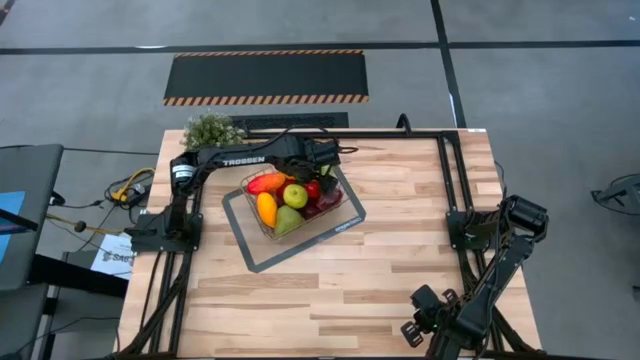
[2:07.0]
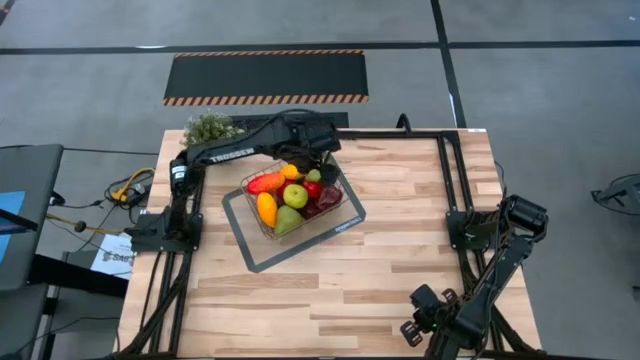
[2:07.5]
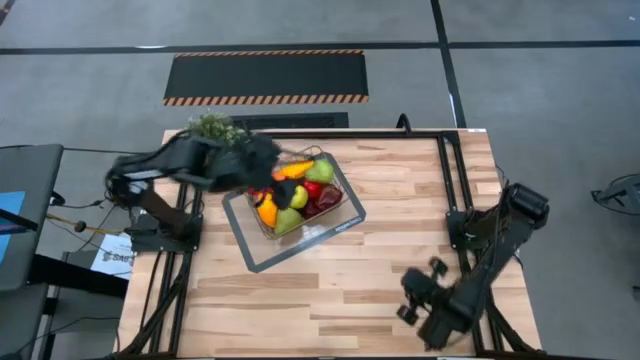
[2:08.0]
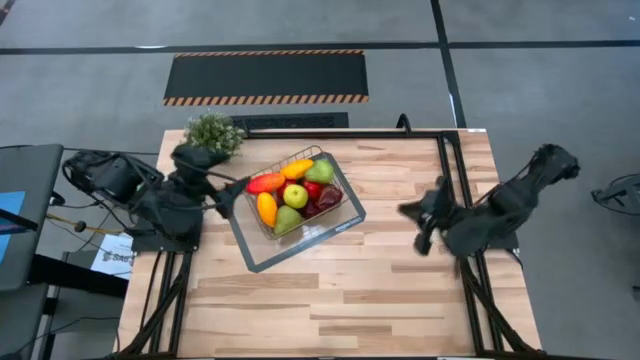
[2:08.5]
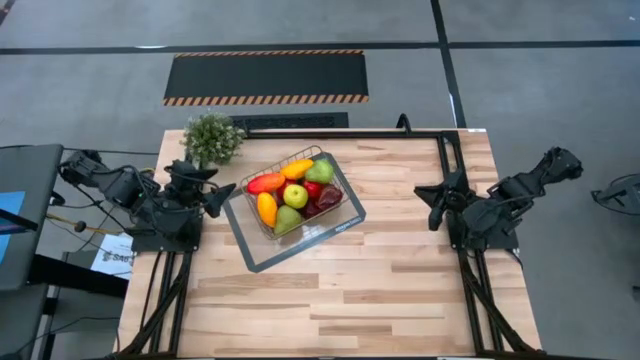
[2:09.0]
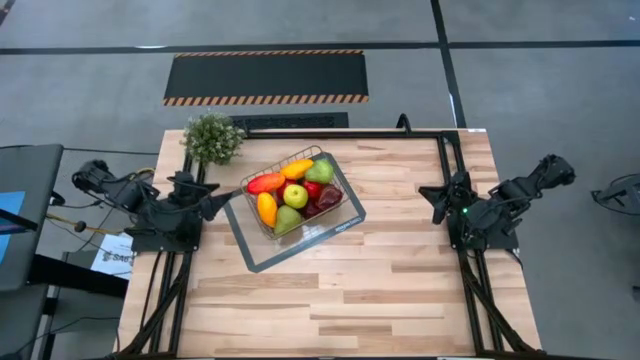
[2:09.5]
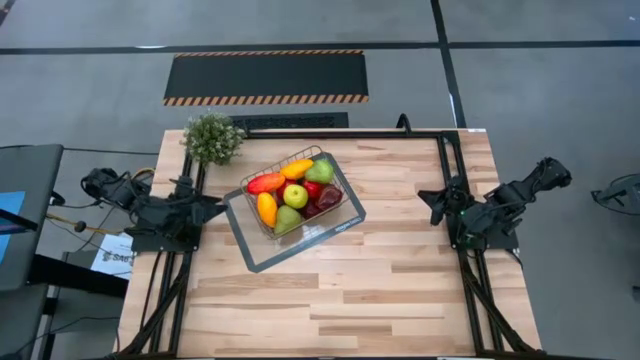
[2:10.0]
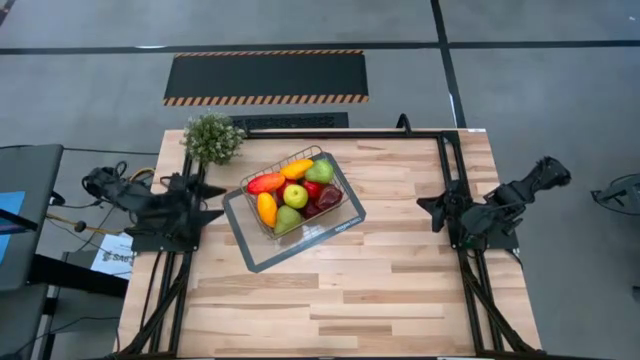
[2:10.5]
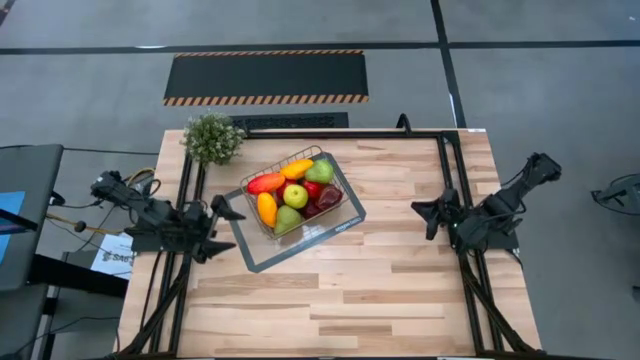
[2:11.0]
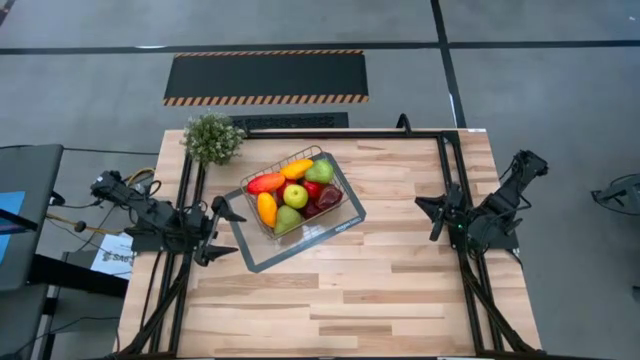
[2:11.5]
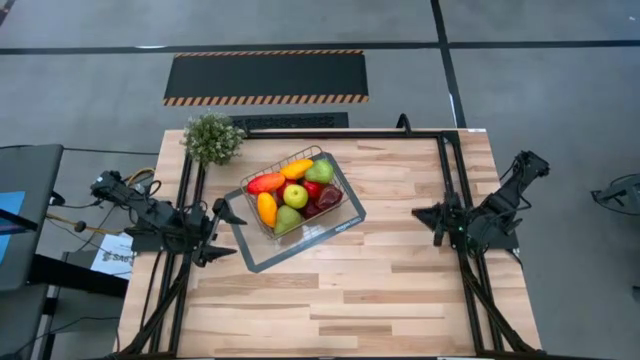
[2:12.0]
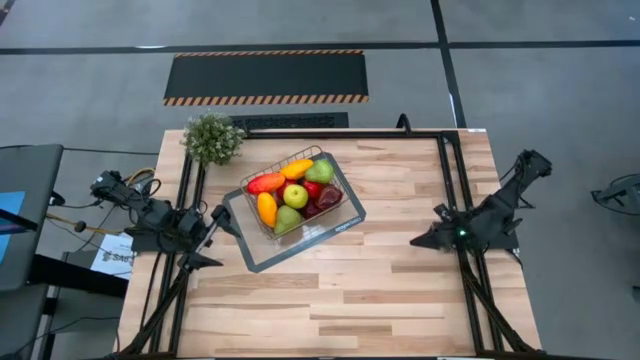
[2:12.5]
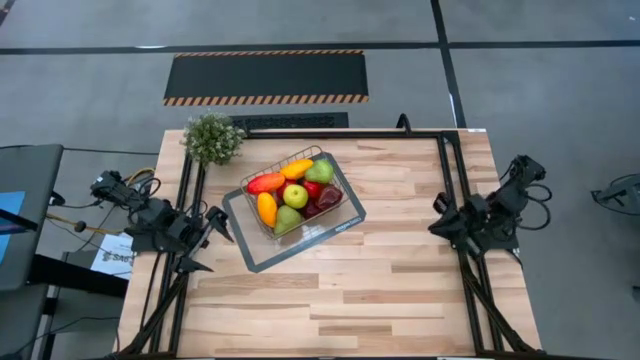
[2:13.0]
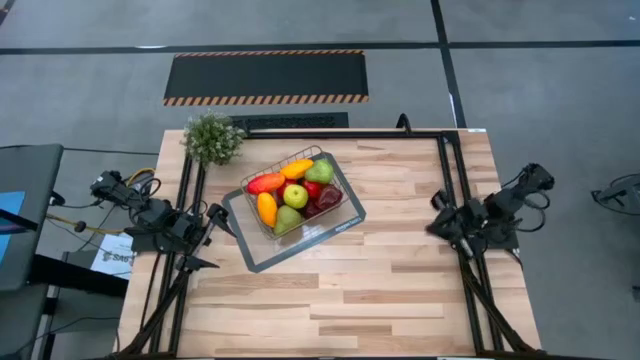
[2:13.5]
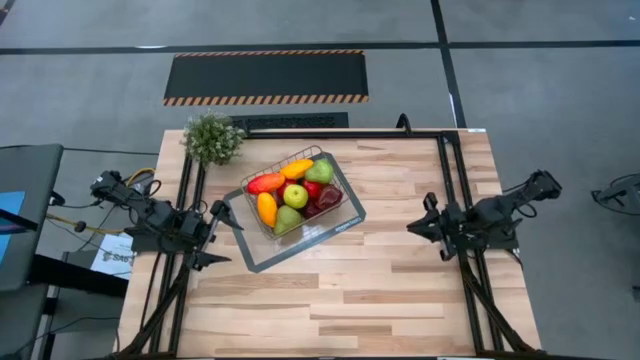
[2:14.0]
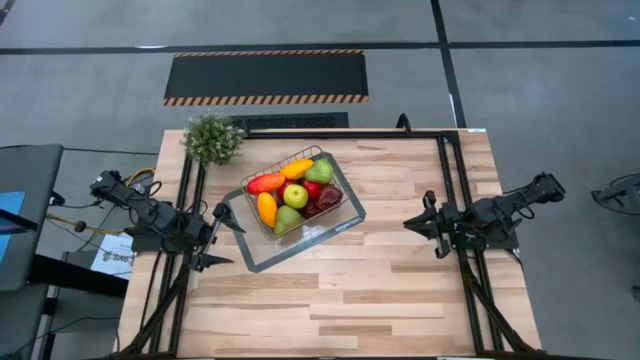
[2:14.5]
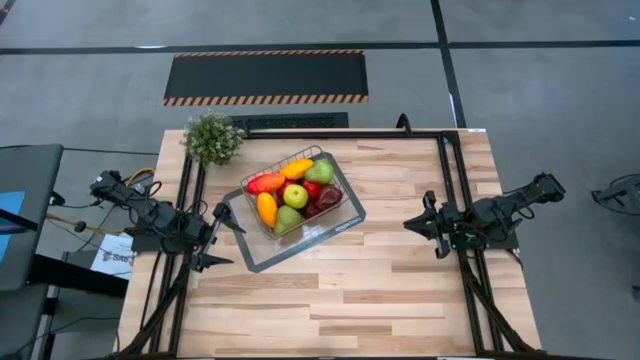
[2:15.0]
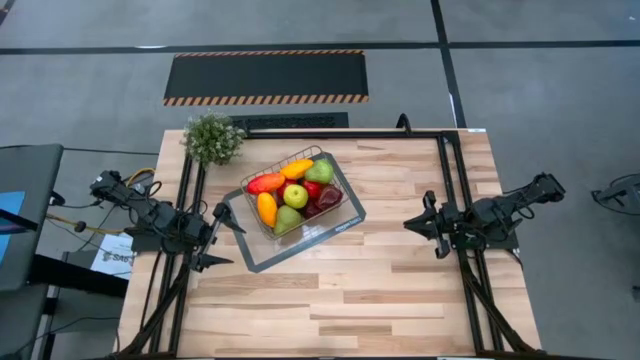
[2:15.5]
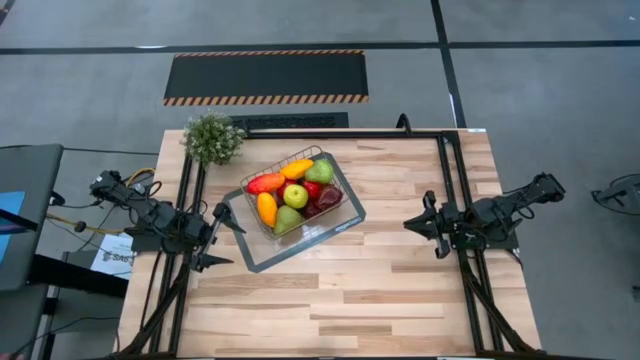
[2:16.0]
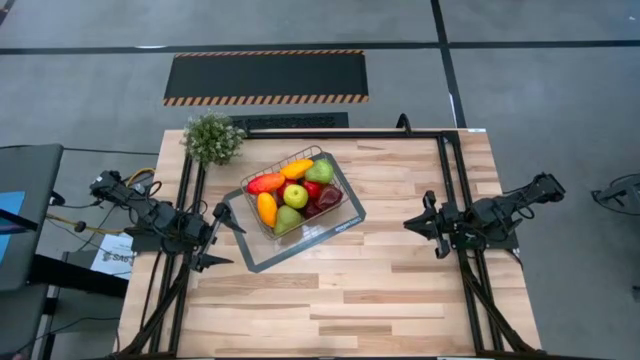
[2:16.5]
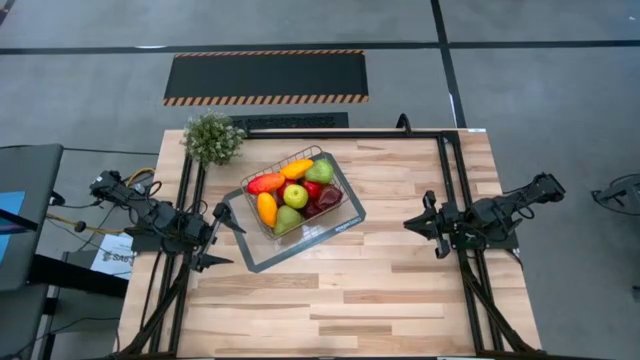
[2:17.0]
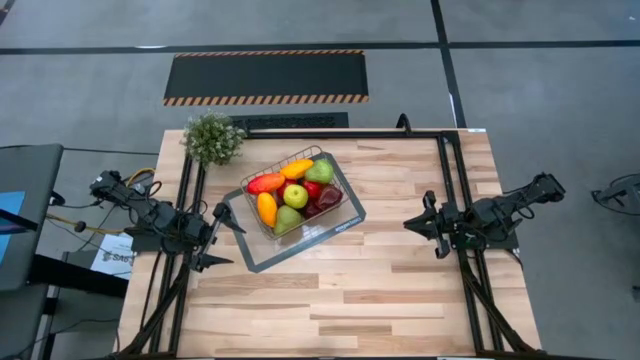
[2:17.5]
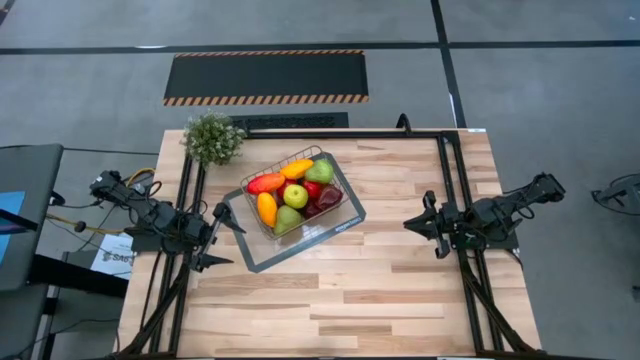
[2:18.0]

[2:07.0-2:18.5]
Task: Build produce basket
Return to Home Position

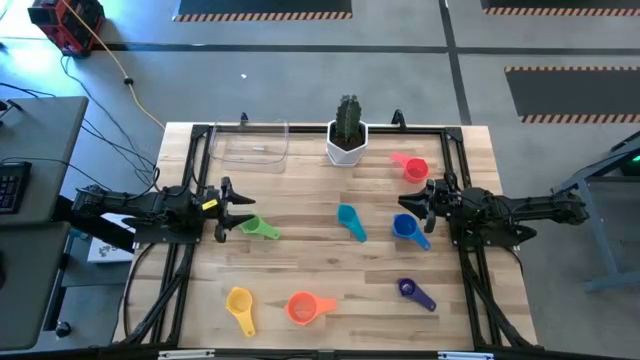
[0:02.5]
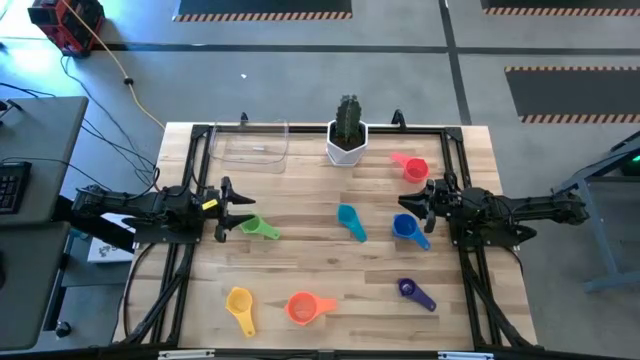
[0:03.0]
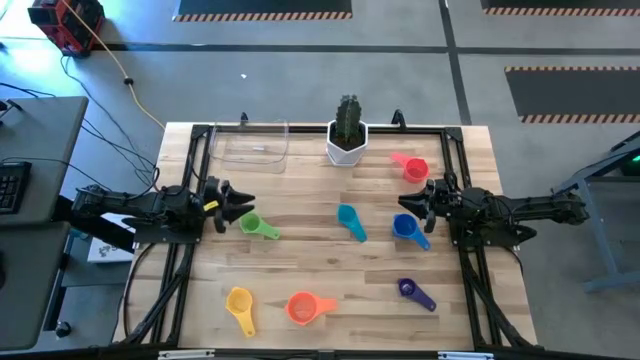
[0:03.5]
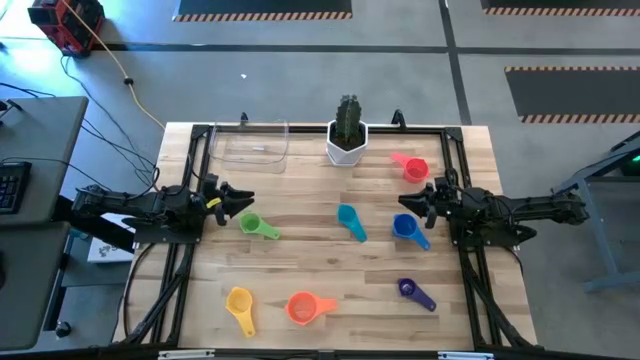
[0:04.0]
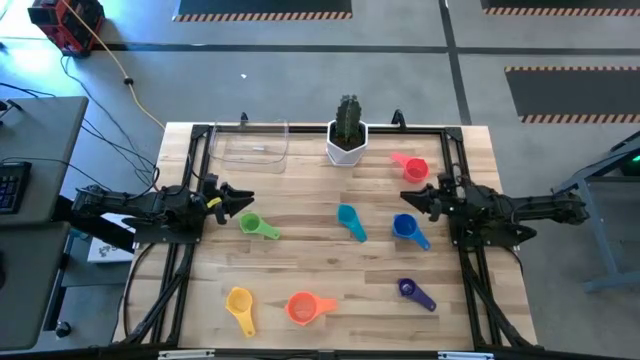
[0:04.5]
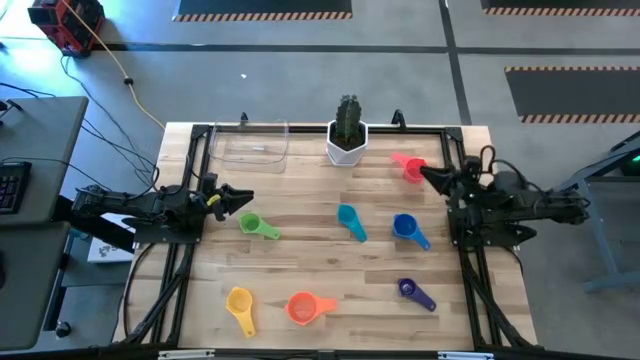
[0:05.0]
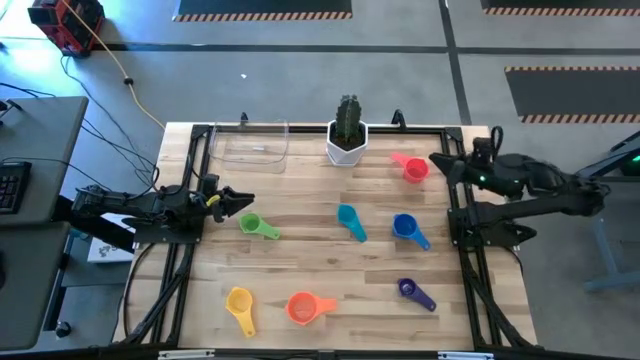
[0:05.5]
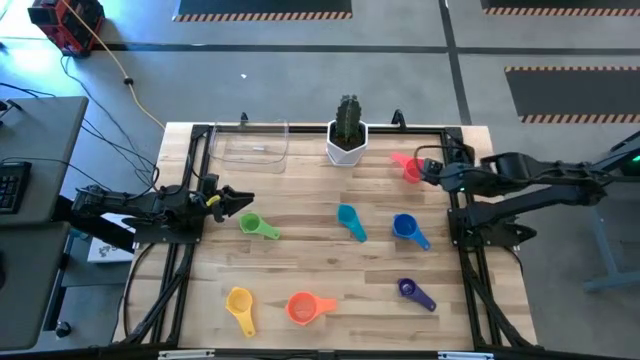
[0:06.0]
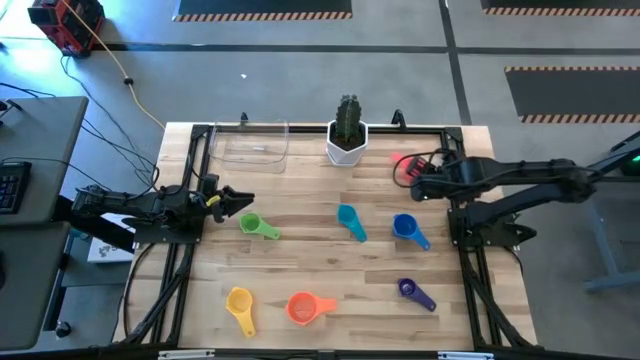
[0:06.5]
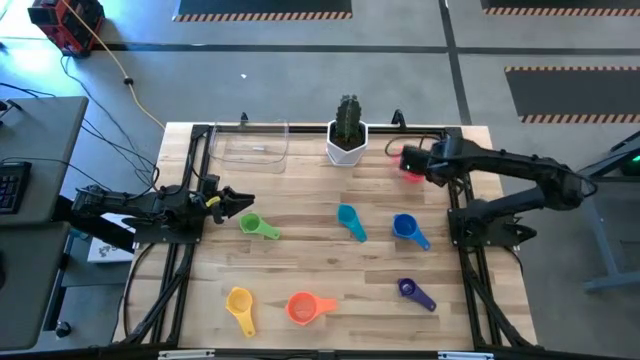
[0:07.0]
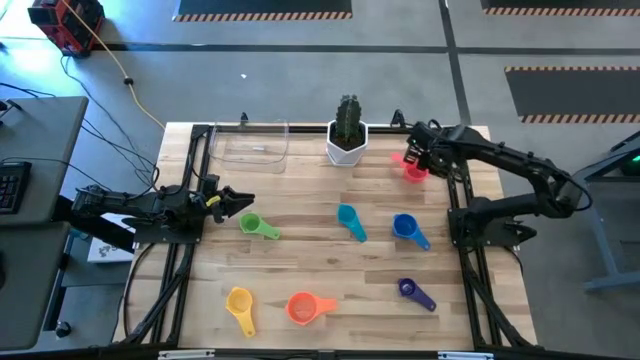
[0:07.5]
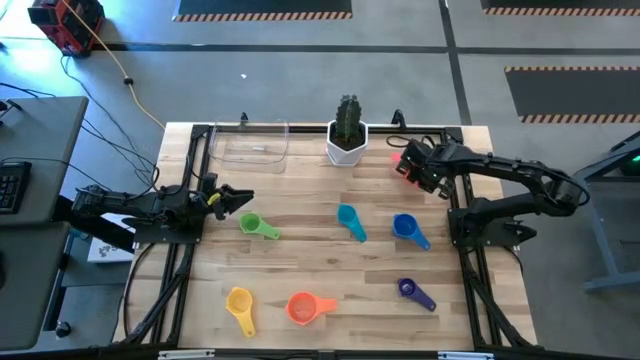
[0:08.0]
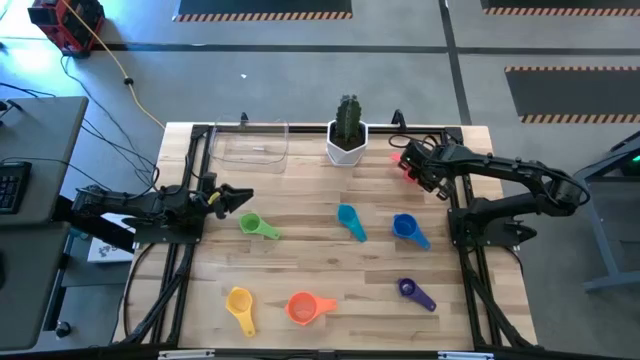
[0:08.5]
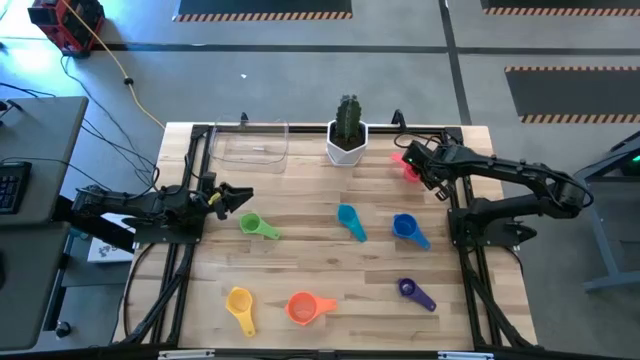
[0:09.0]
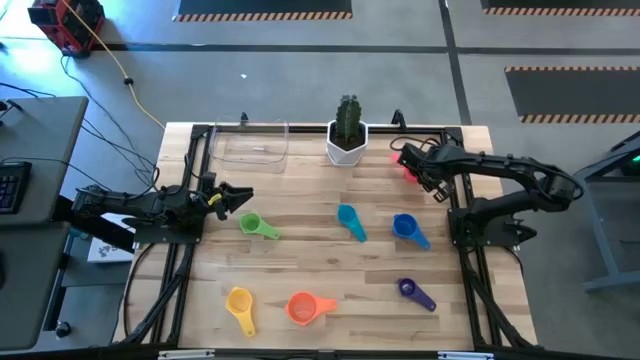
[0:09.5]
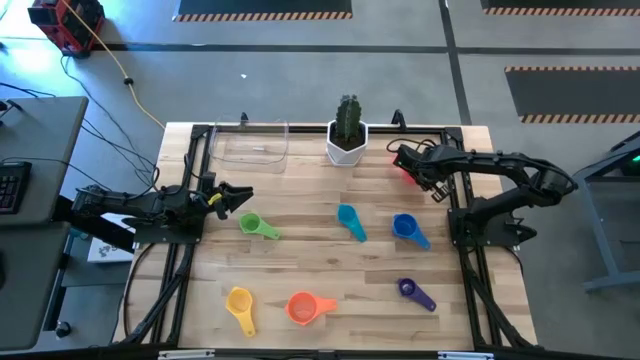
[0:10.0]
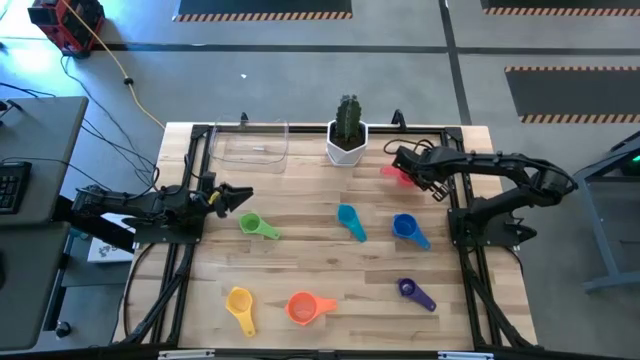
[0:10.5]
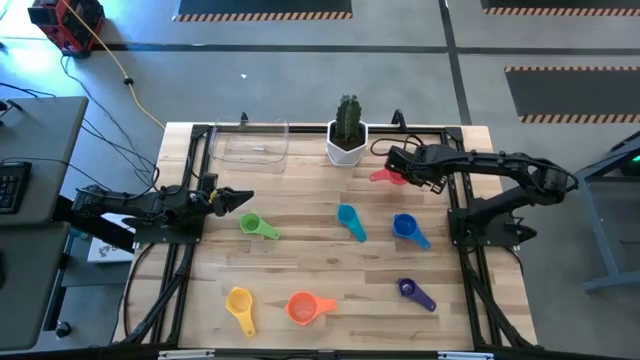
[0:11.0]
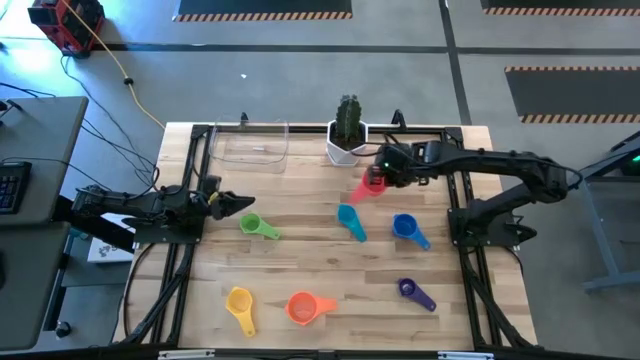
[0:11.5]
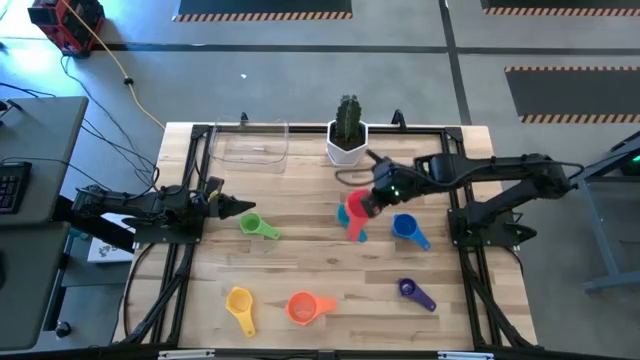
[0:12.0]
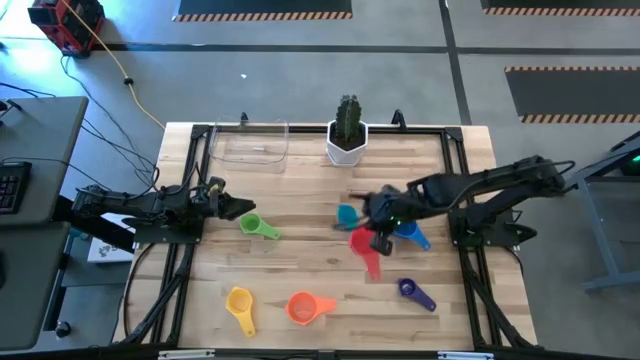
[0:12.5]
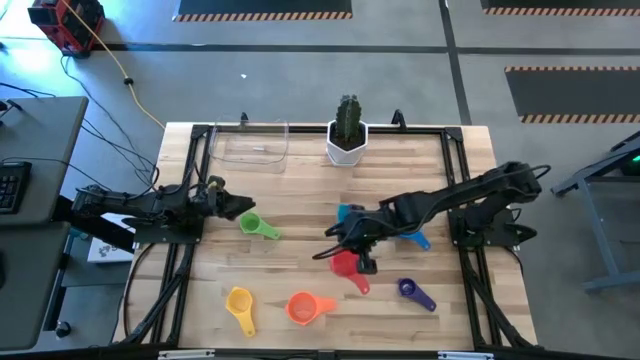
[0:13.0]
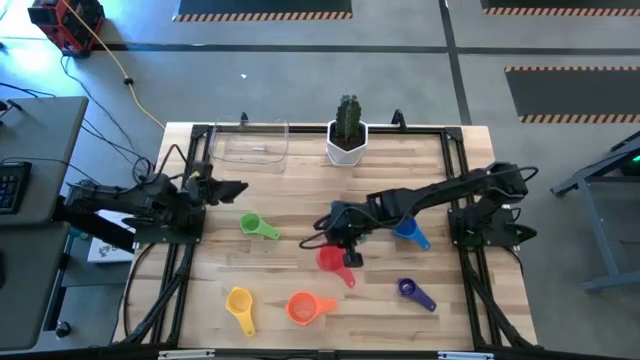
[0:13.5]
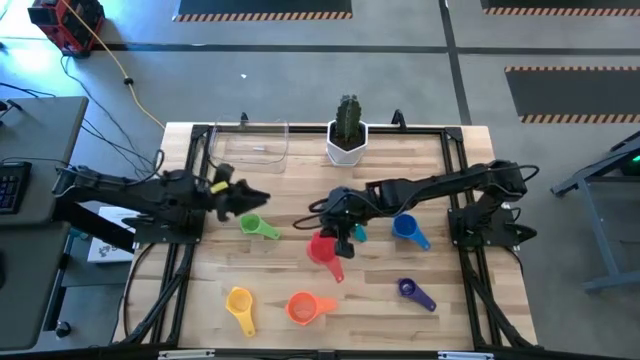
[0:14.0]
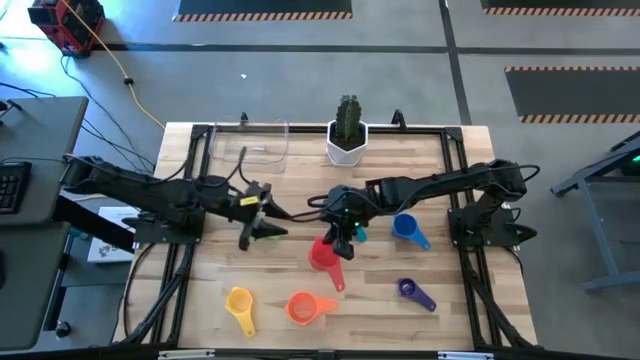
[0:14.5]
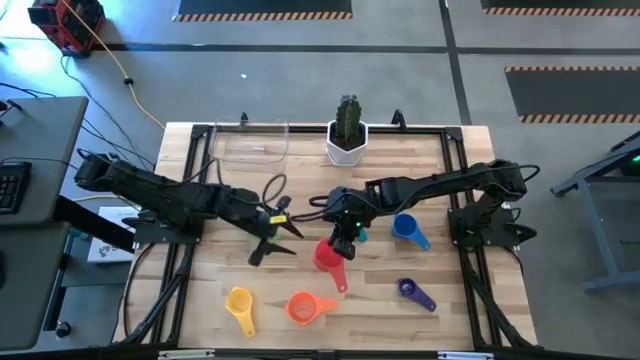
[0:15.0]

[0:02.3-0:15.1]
Task: Nest measuring cups in basket
Stack the pink measuring cup on the orange measuring cup
